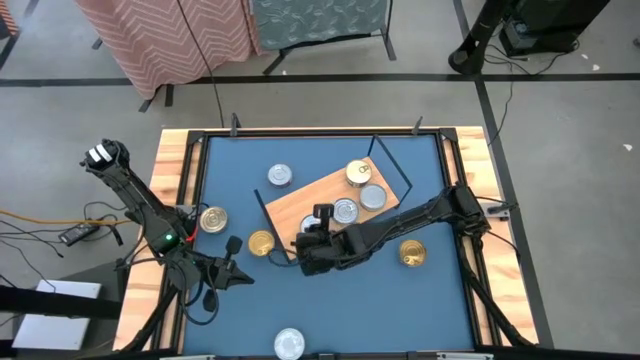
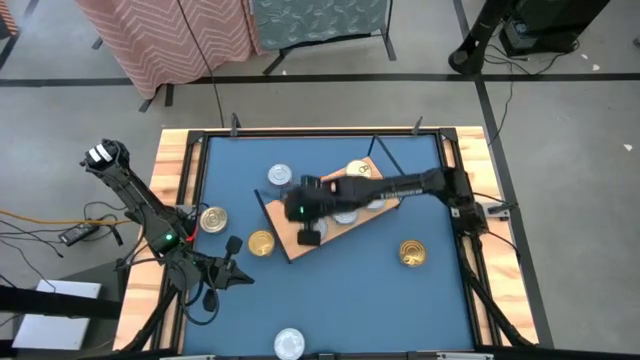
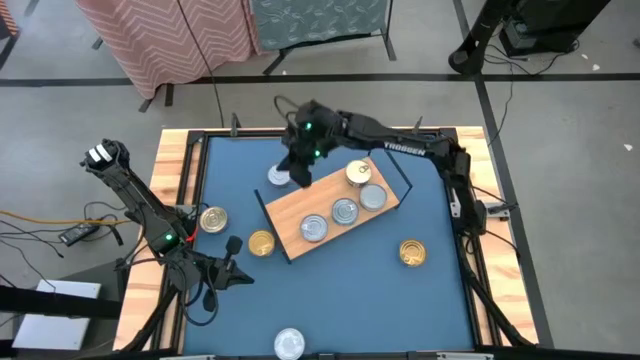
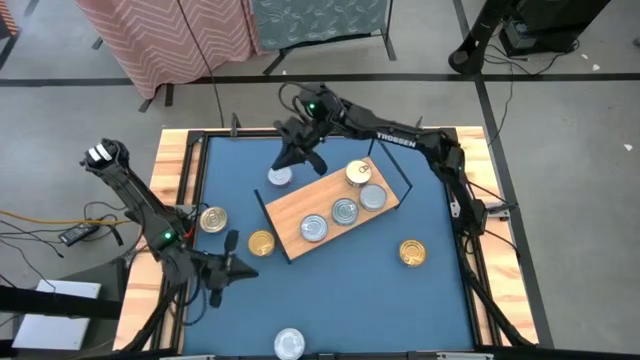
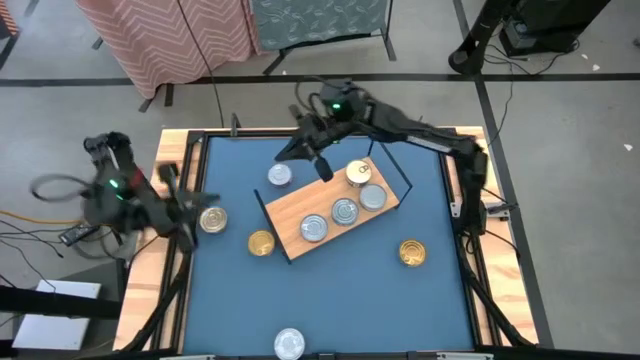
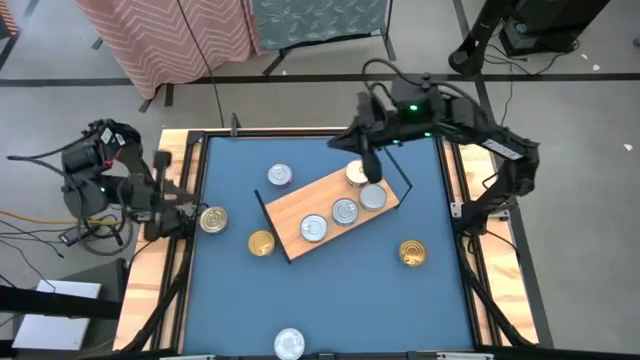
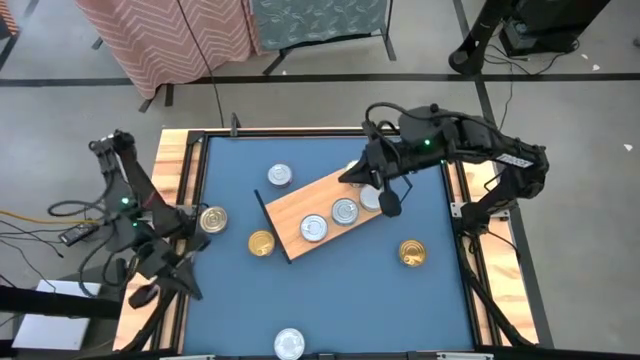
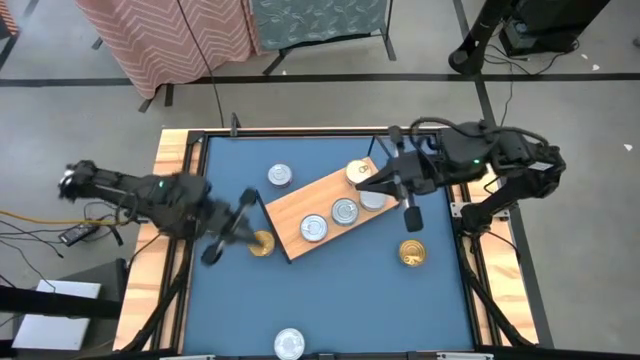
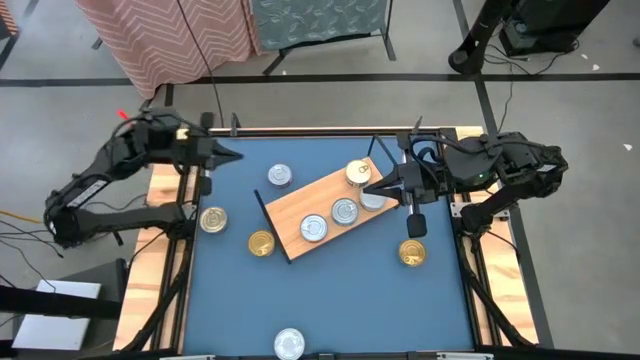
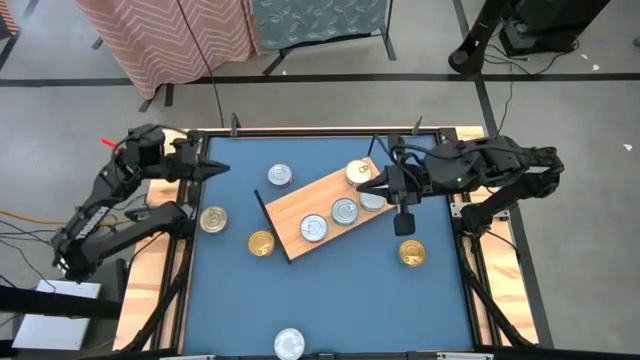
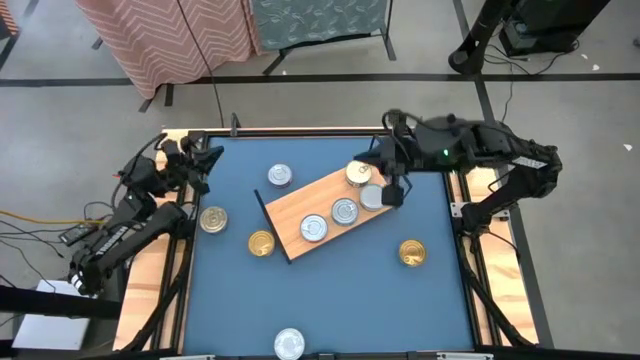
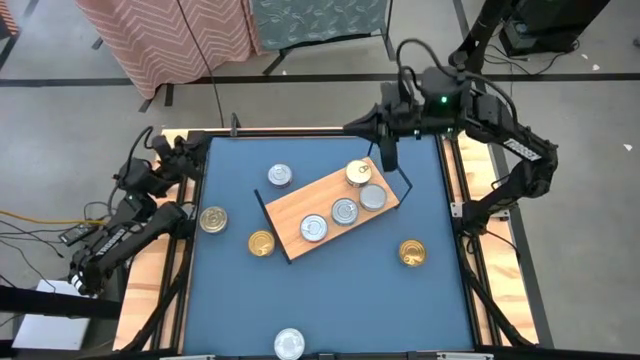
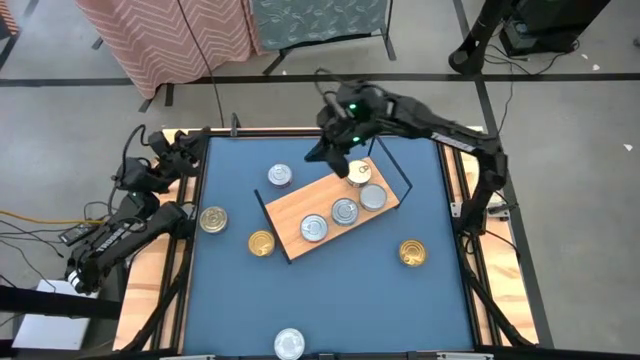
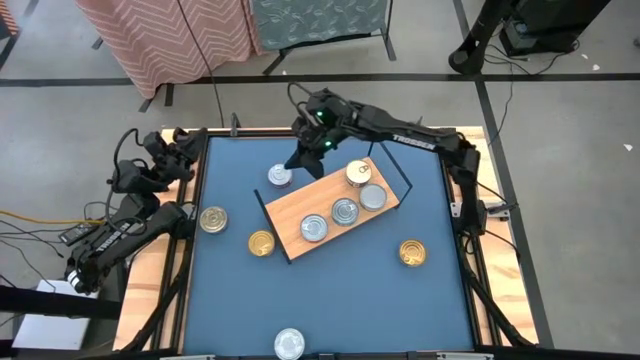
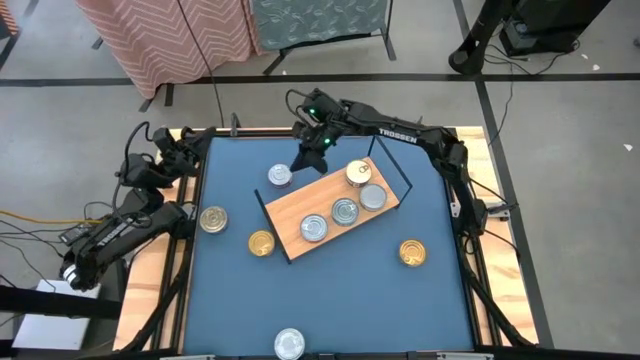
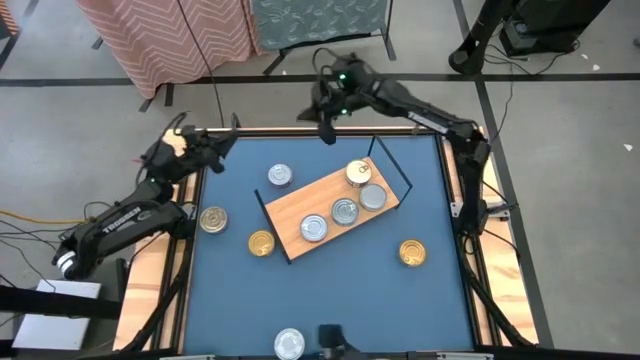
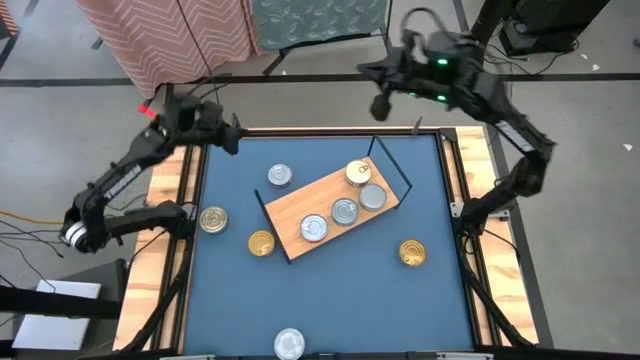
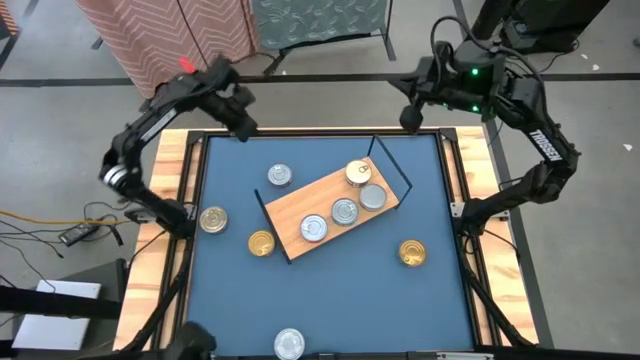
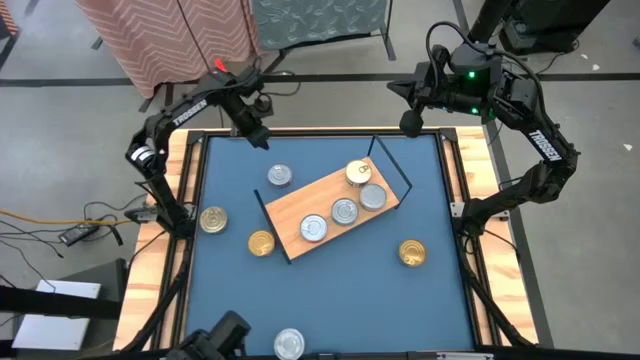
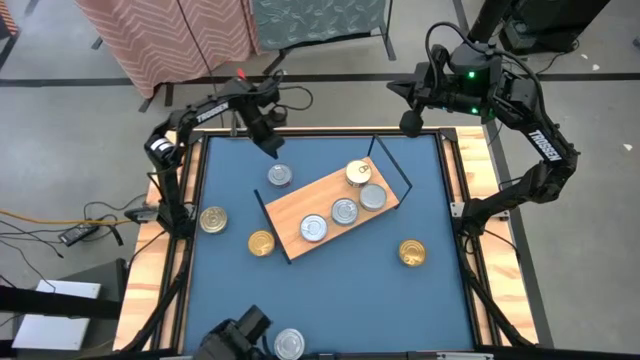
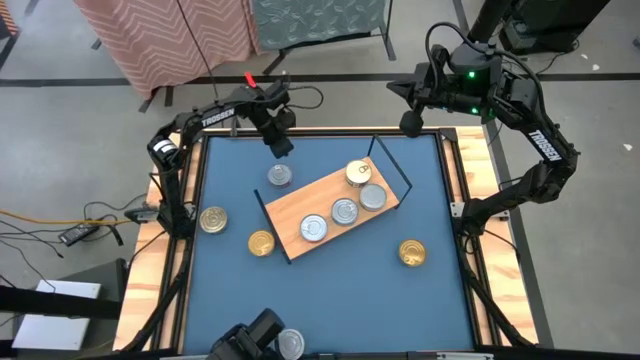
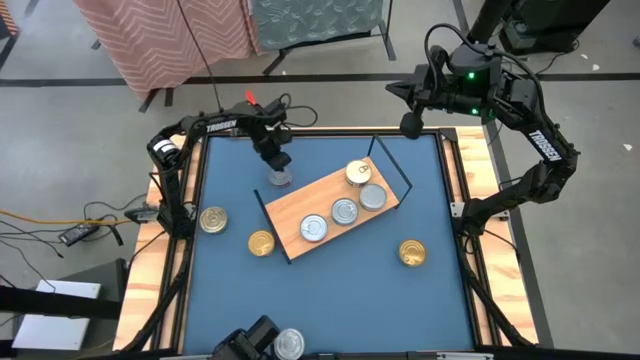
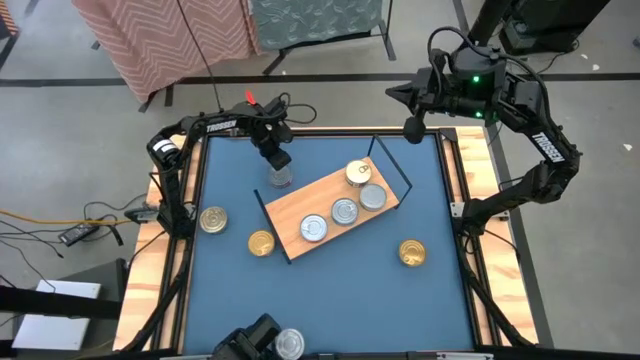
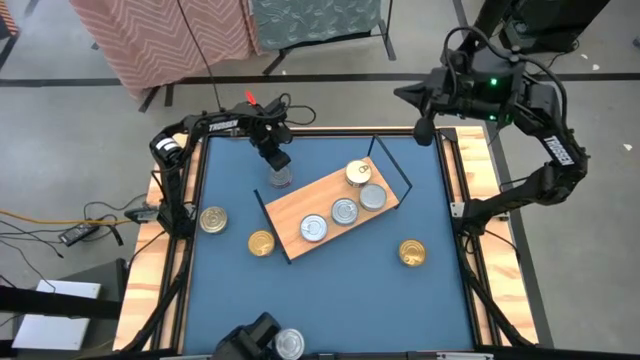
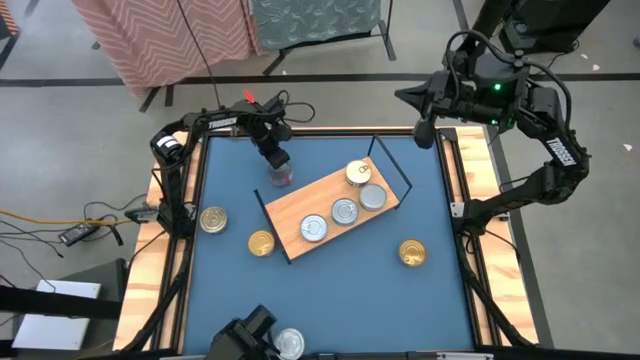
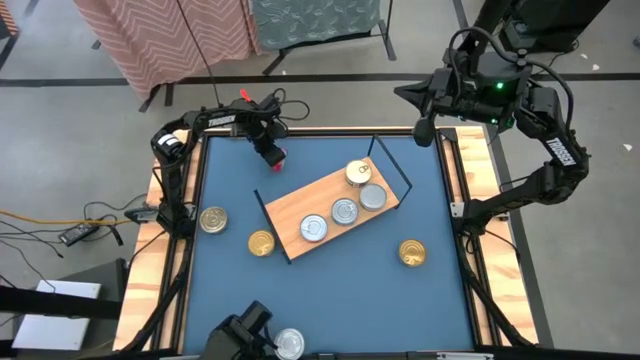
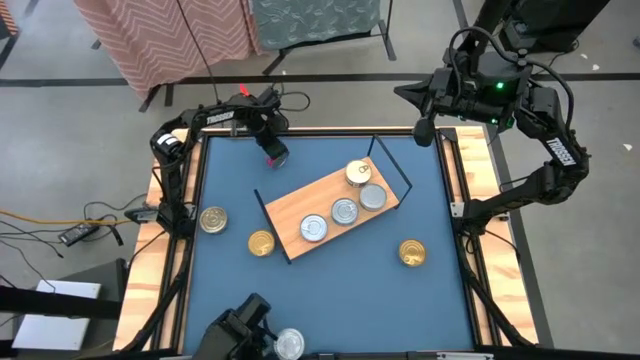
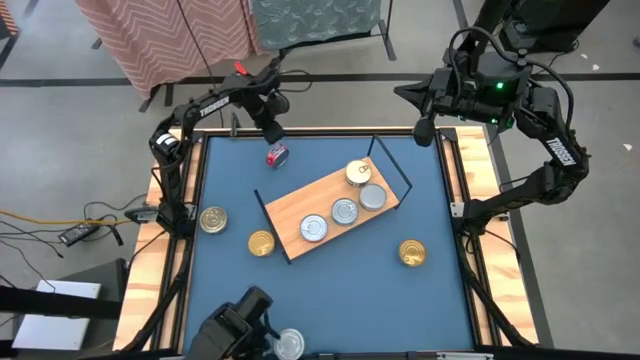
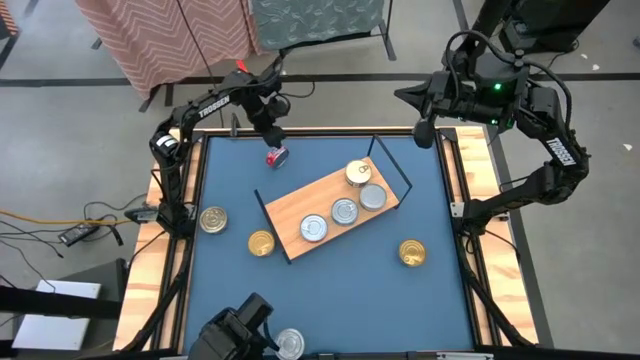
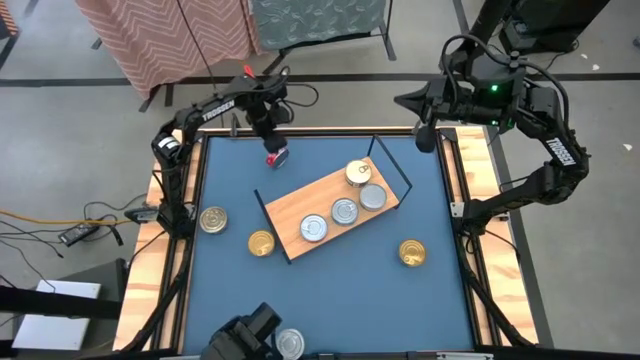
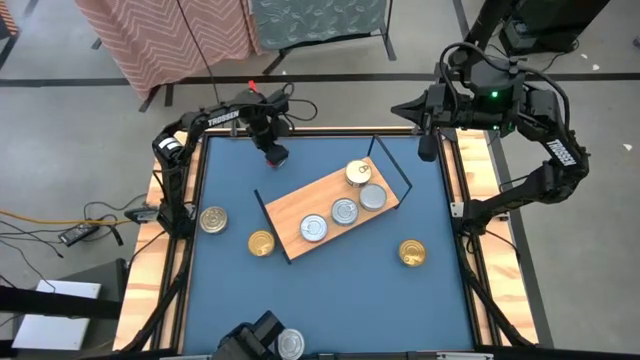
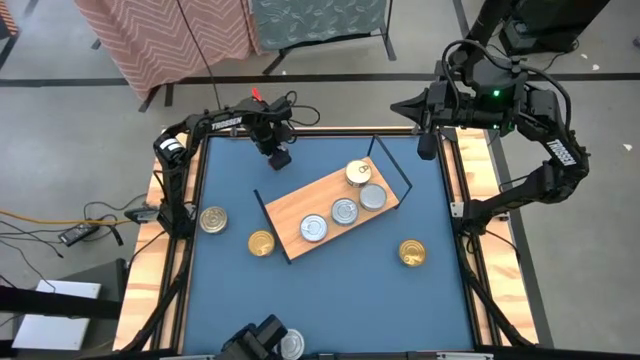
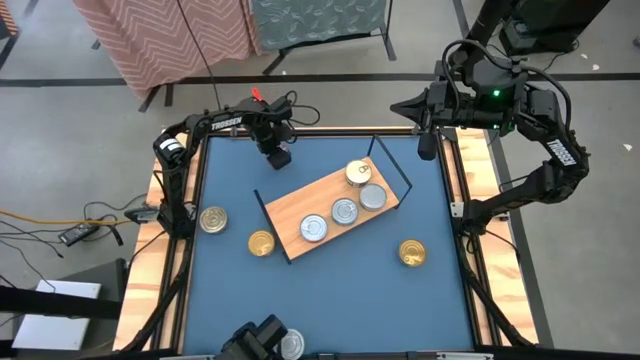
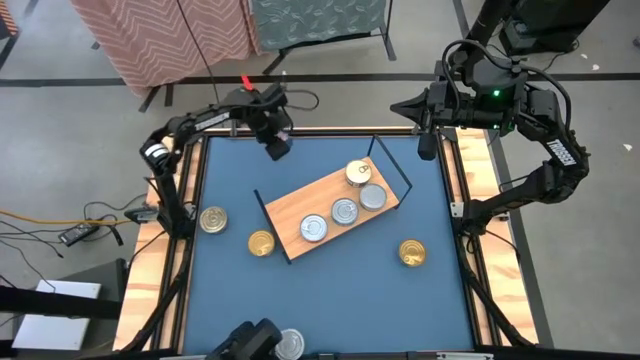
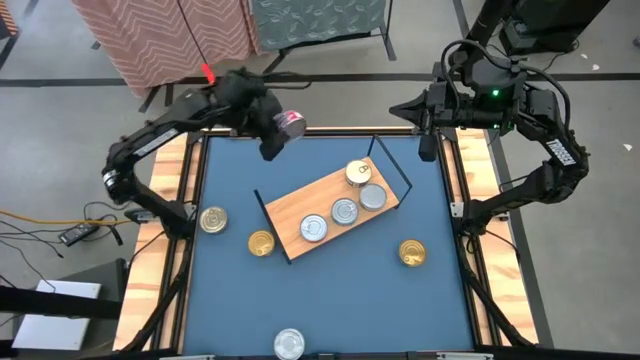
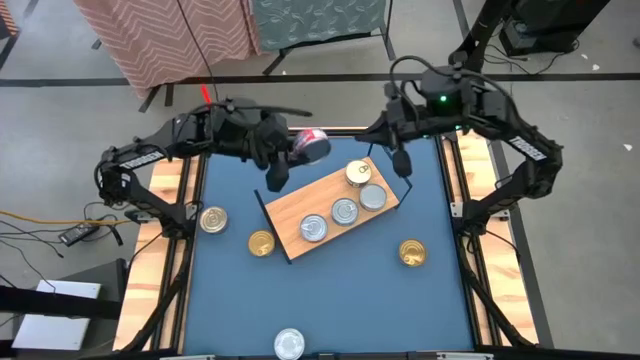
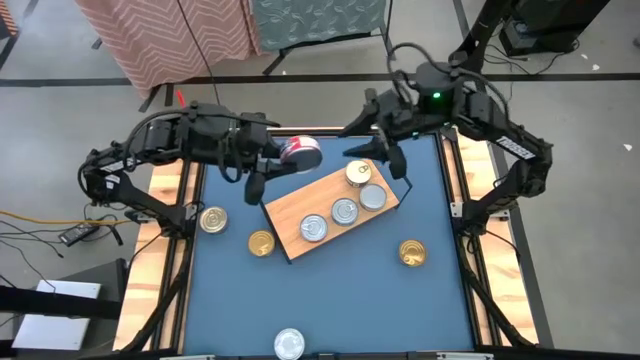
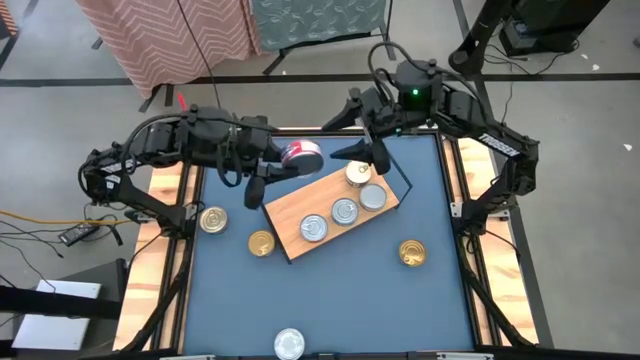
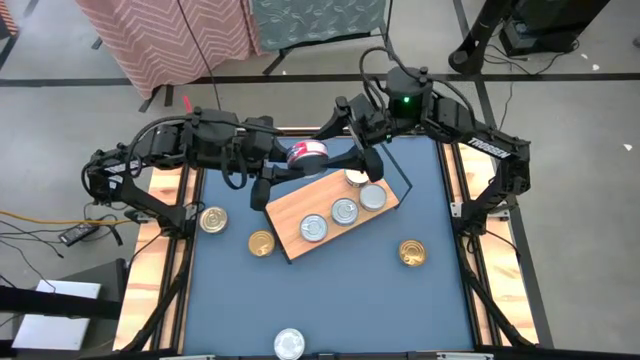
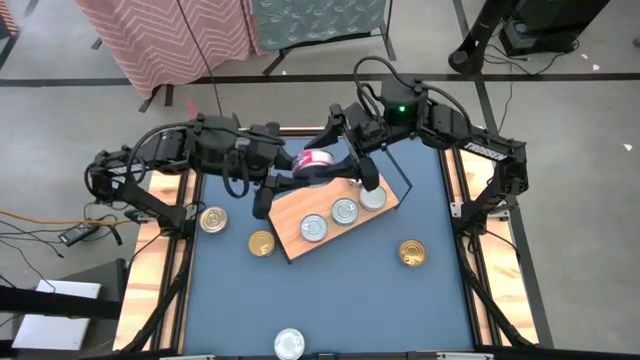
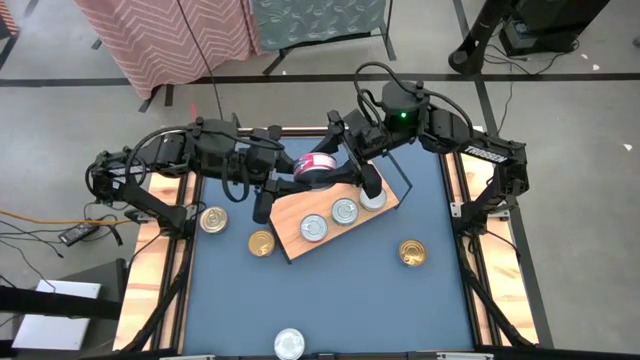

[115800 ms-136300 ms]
Task: Stack canned seafood by type on shelf
Stack the red tuna can on top of the red tuna can on the shelf
